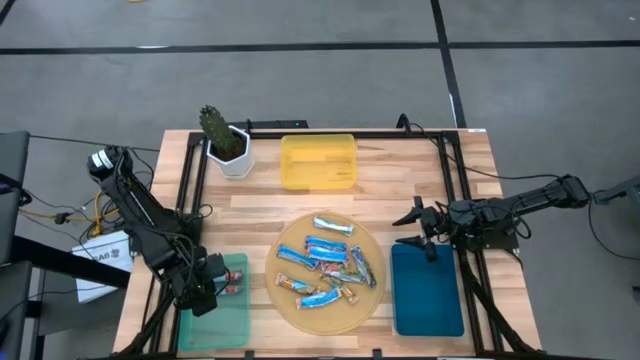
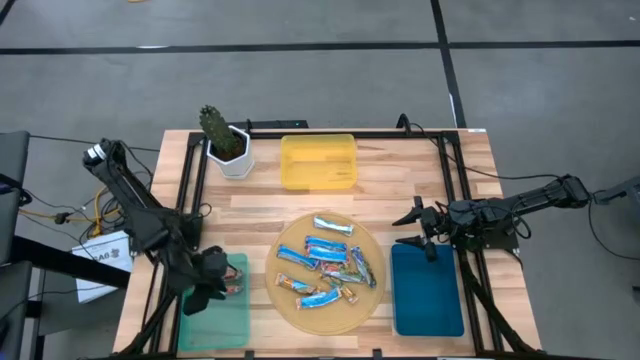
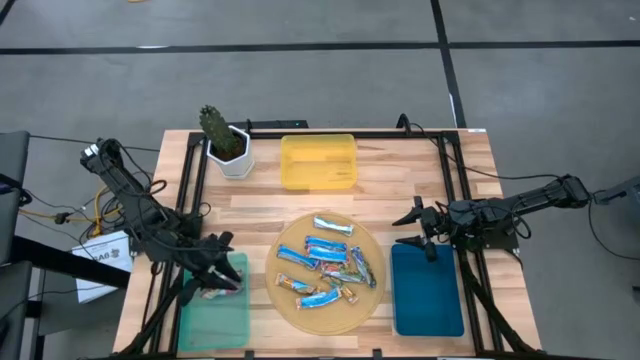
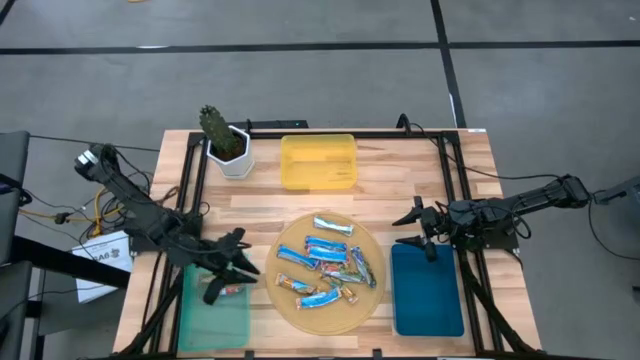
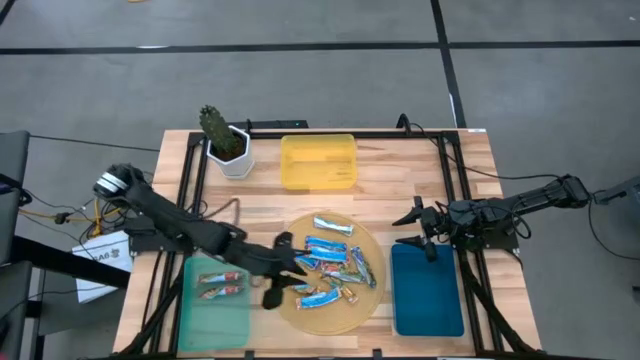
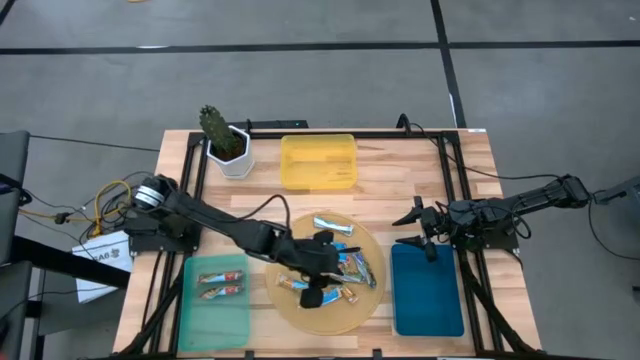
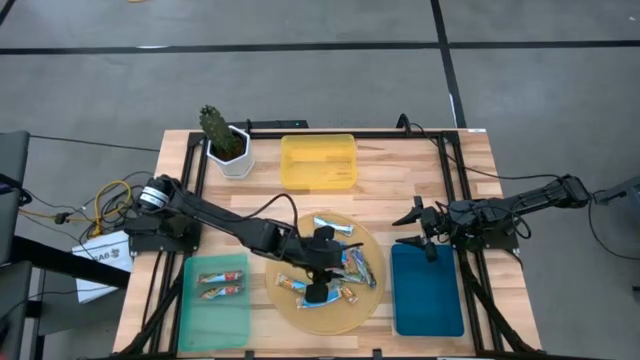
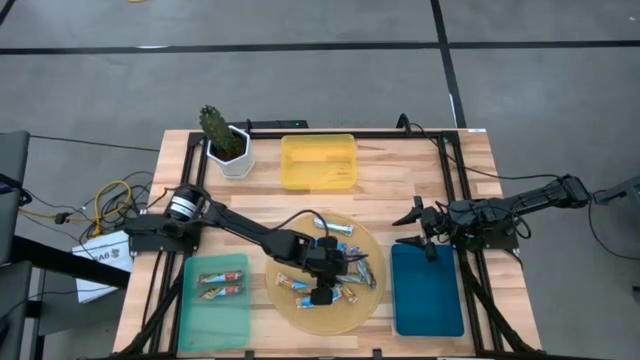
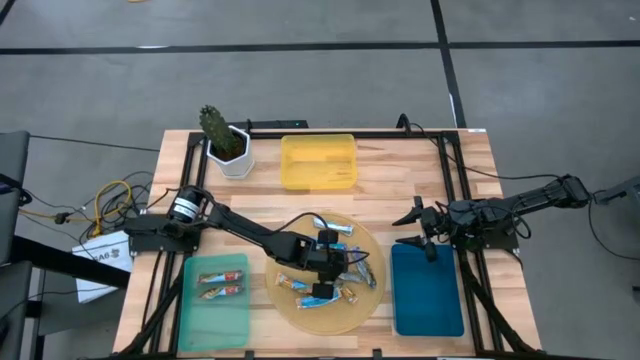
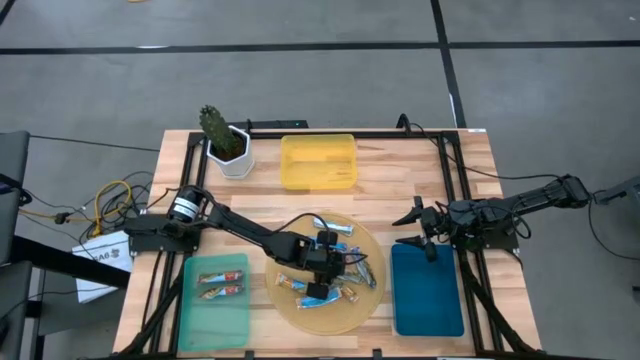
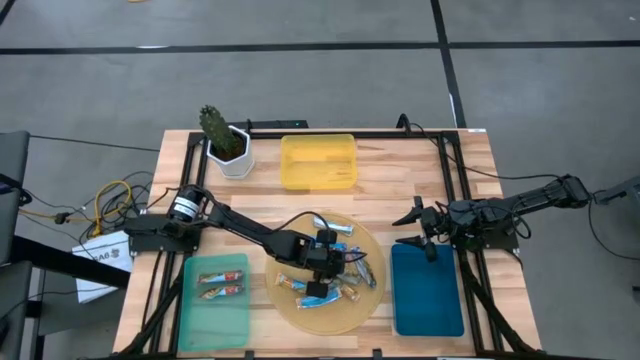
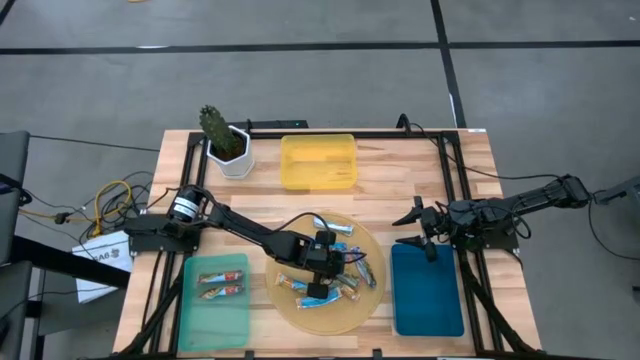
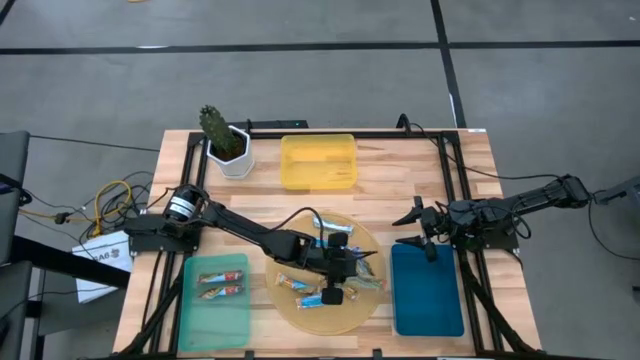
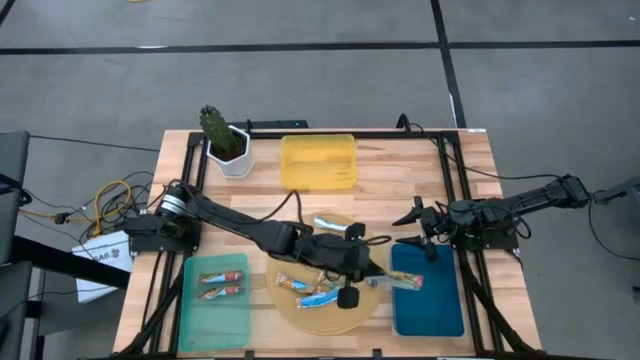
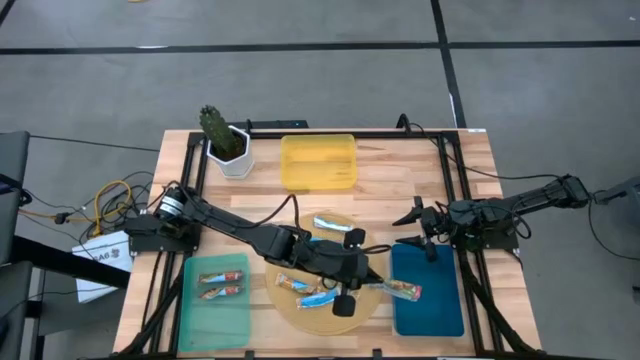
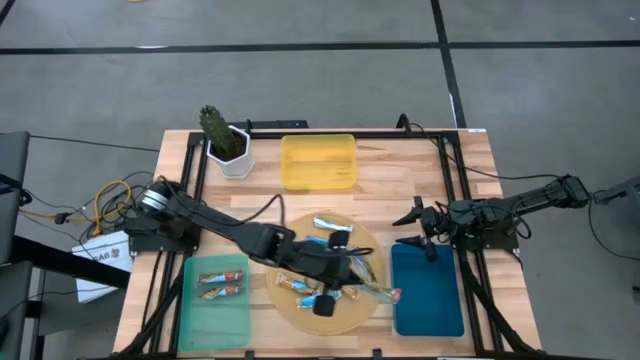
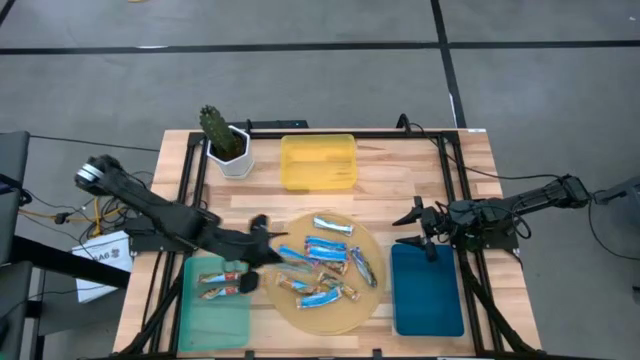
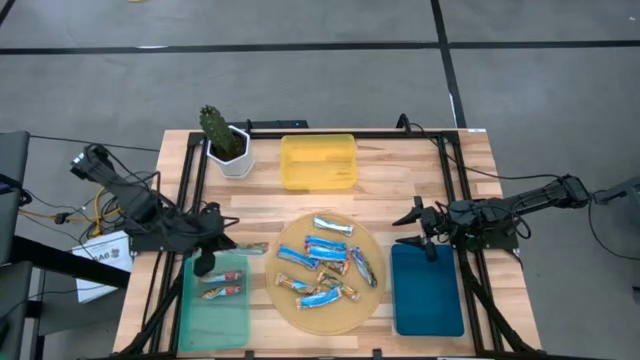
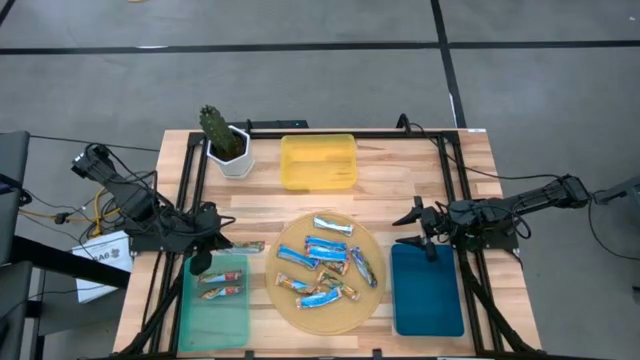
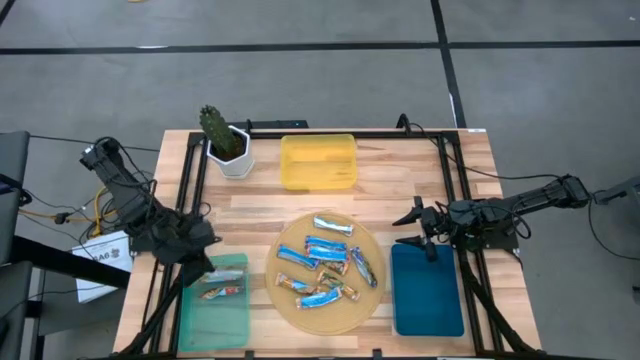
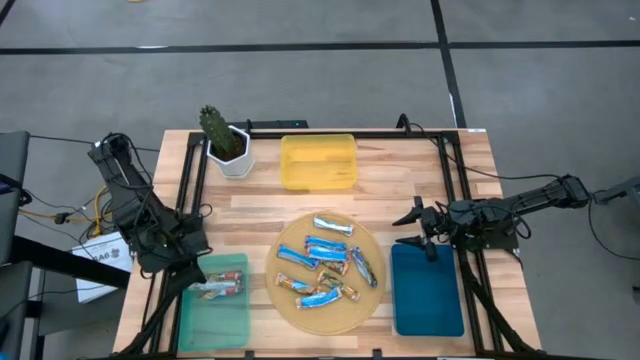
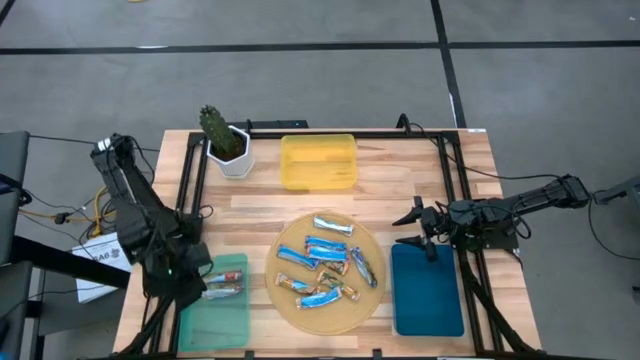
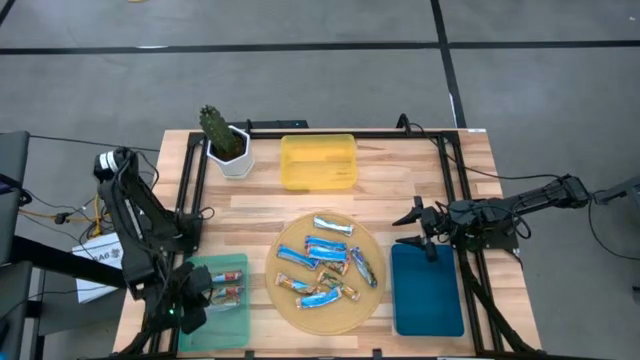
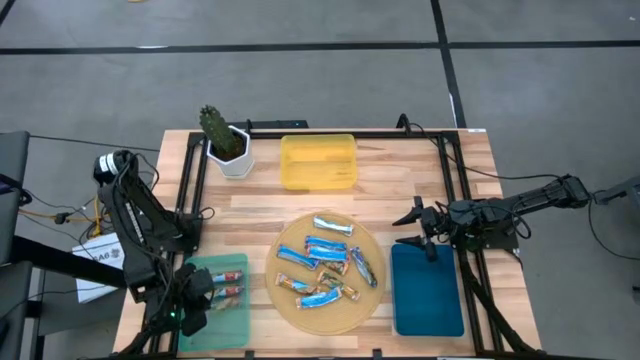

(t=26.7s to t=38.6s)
Task: Pick and place Granola Bars by type
Put the red granola bar into the light blue bin

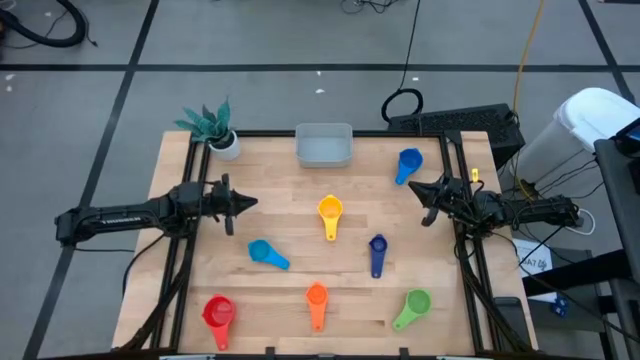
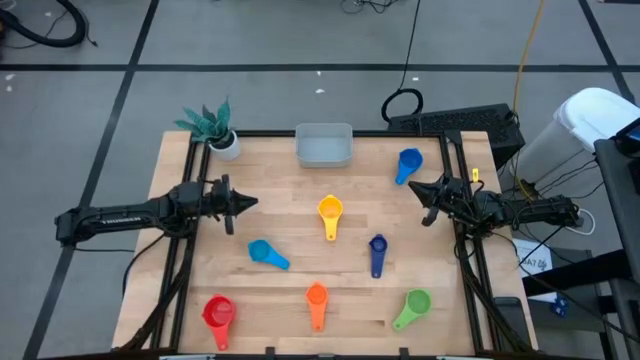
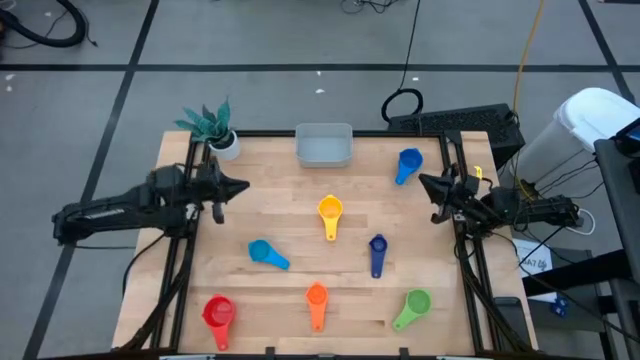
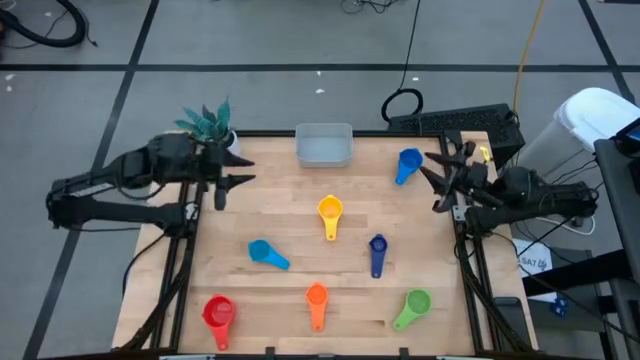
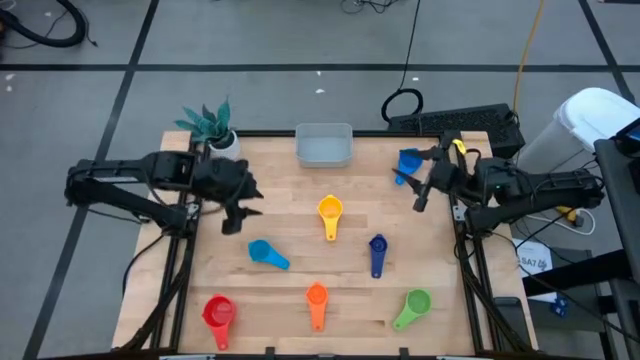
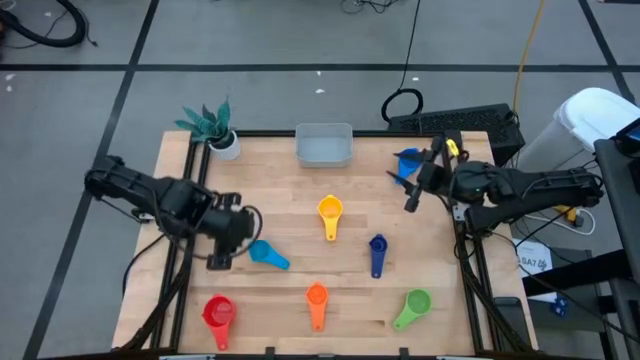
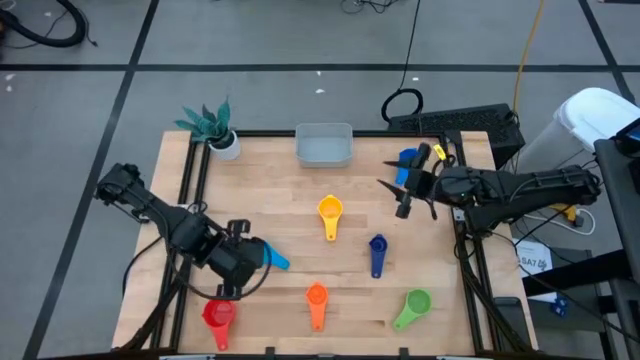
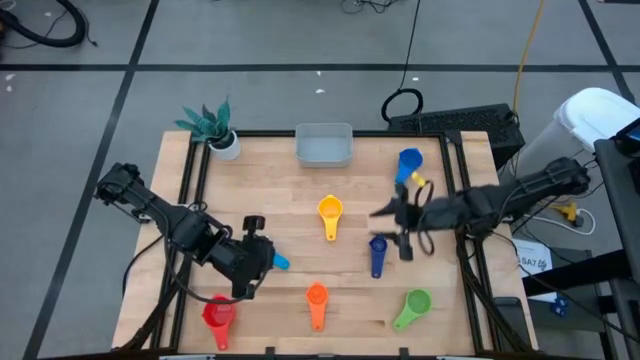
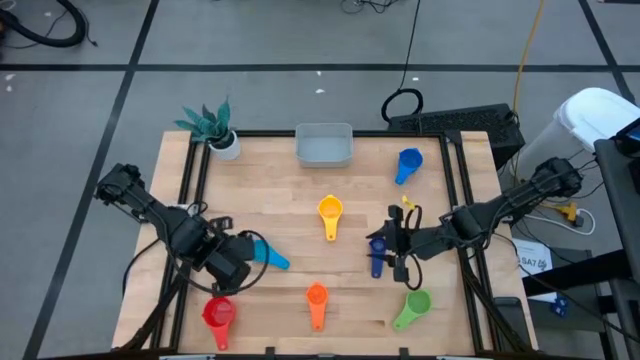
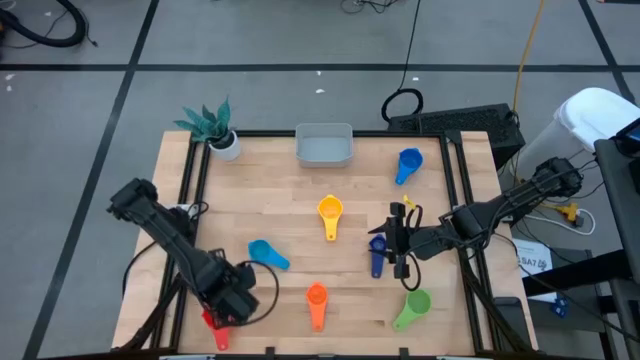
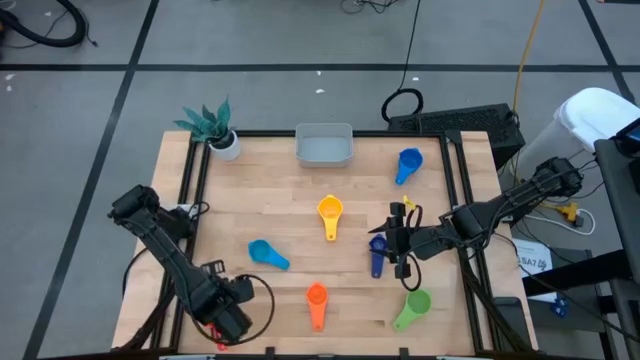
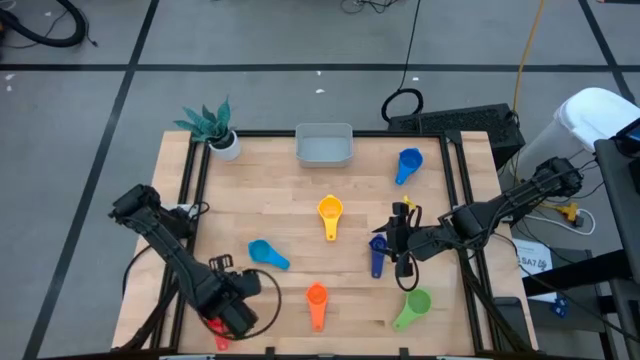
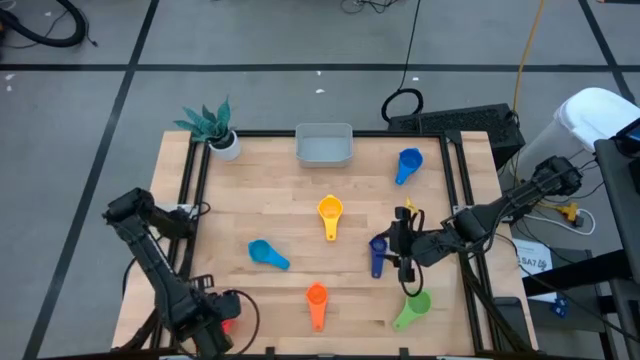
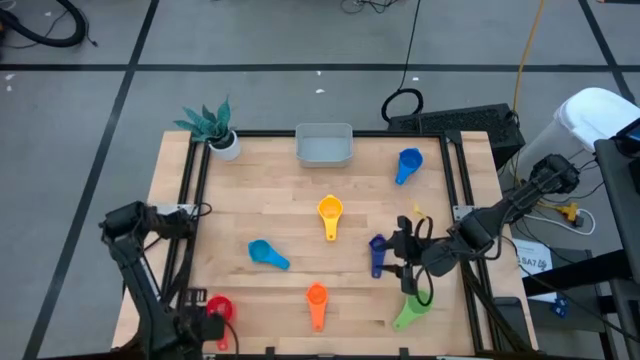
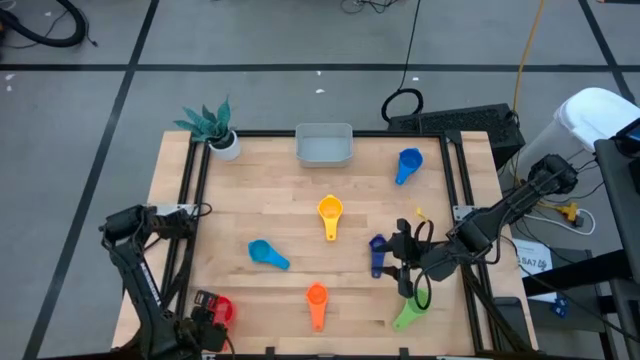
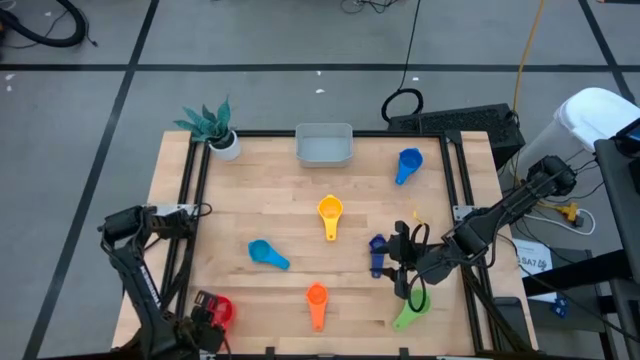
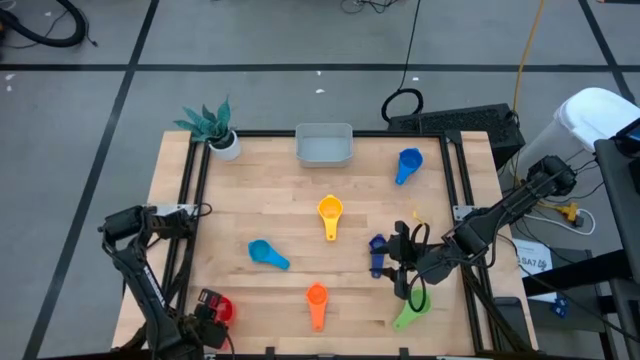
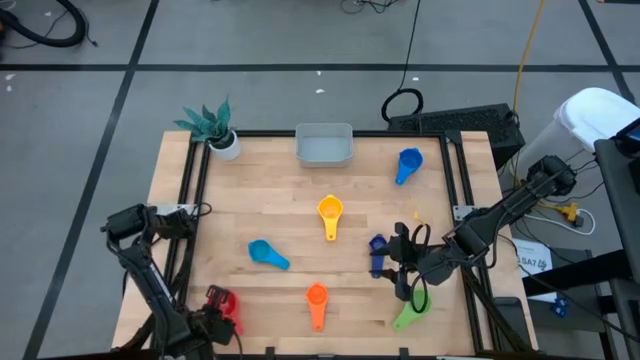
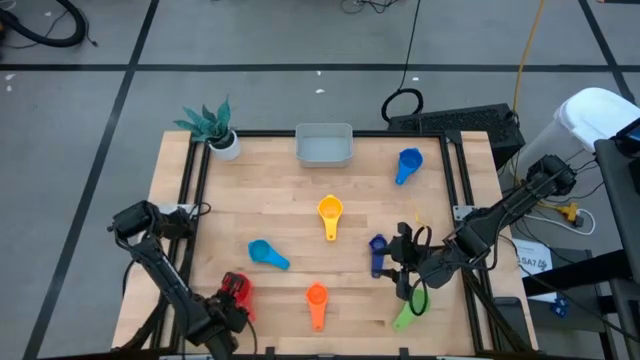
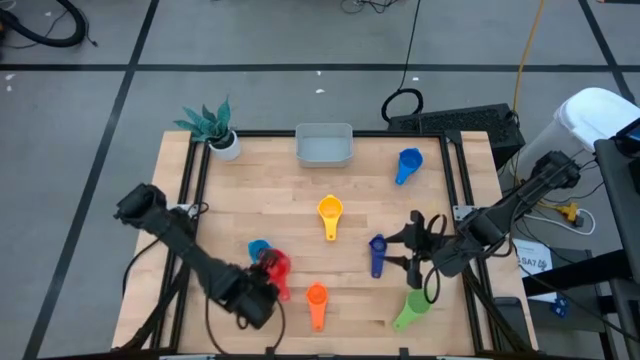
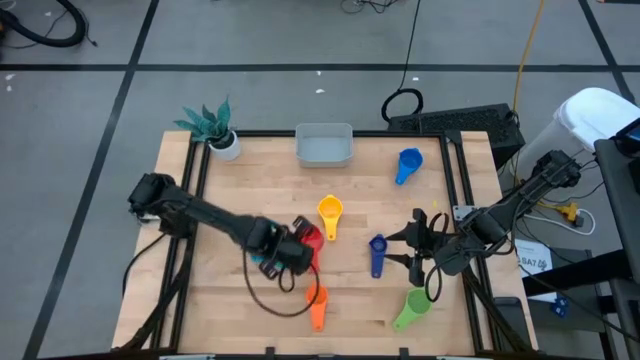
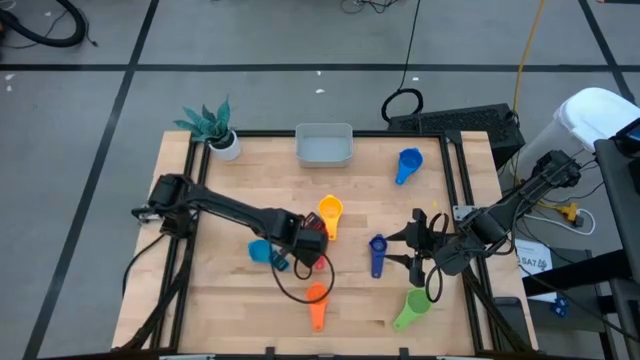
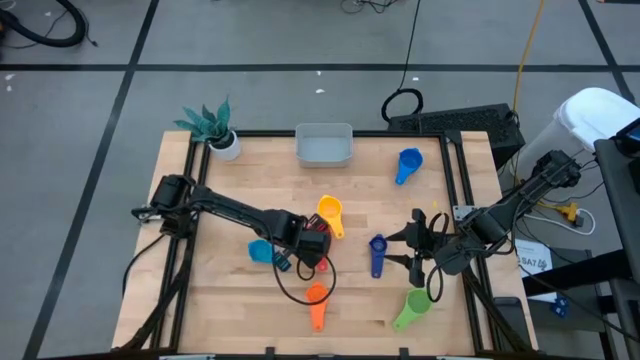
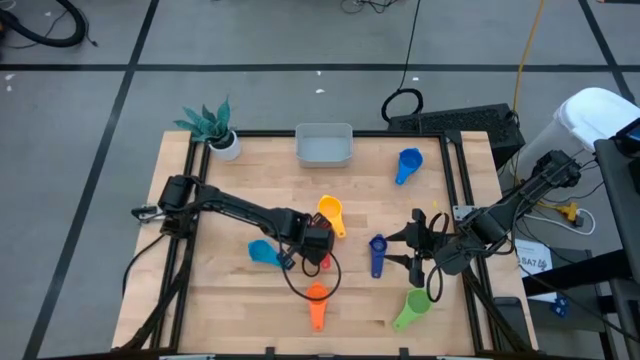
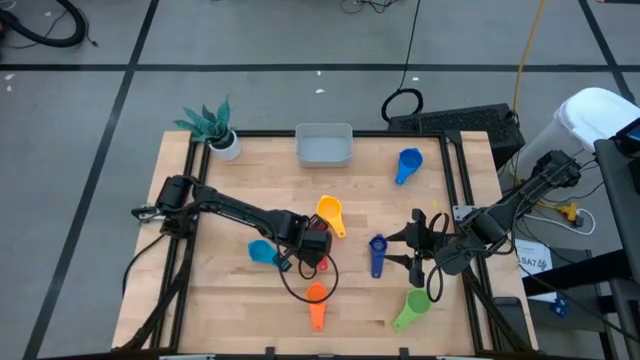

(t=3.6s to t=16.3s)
Task: Nest measuring cups in basket
Move the red measuring cup to the center of the table
